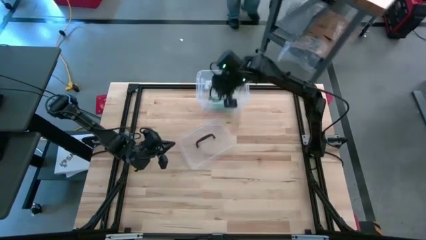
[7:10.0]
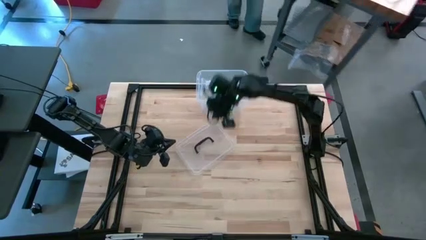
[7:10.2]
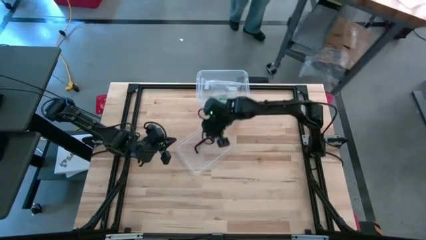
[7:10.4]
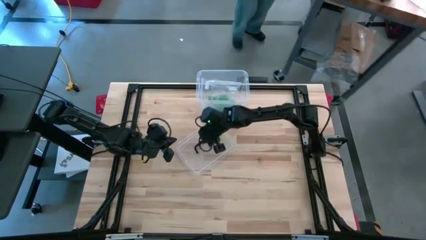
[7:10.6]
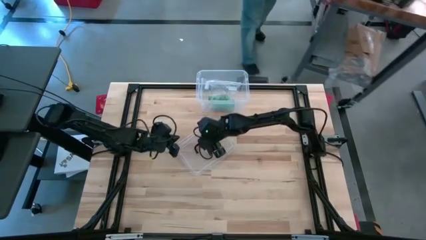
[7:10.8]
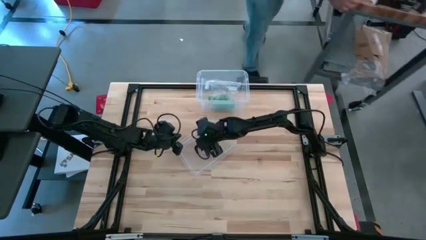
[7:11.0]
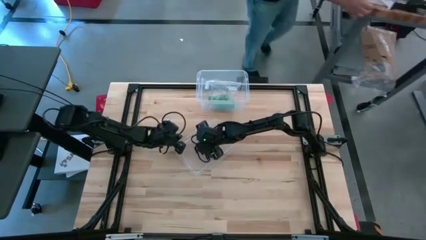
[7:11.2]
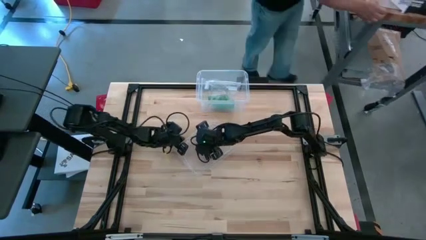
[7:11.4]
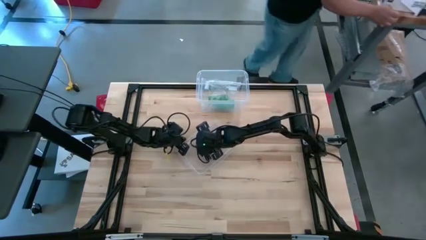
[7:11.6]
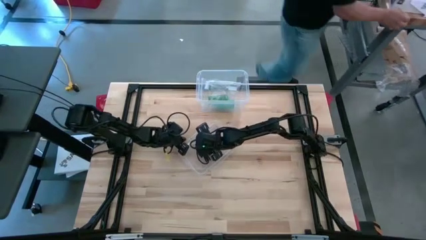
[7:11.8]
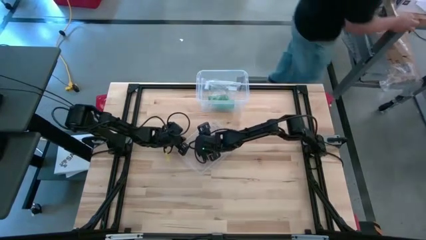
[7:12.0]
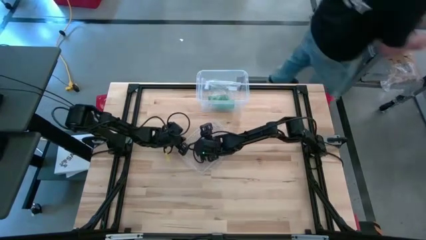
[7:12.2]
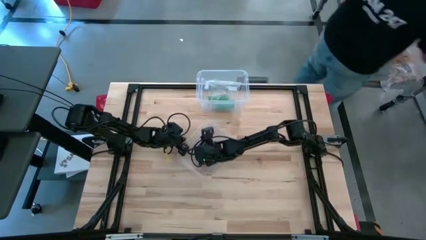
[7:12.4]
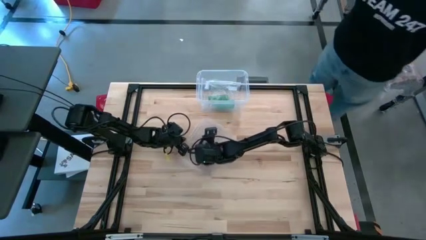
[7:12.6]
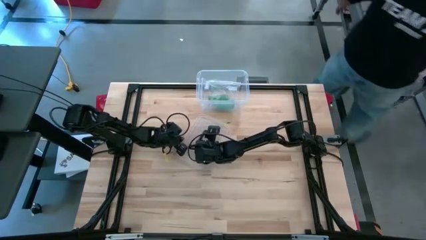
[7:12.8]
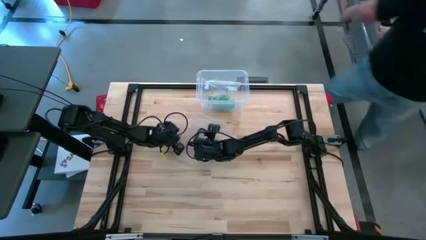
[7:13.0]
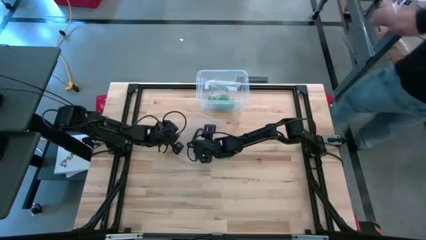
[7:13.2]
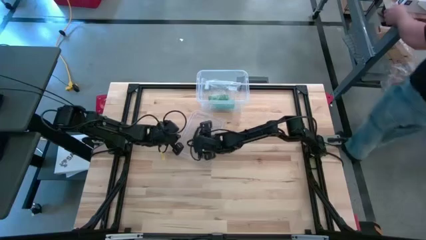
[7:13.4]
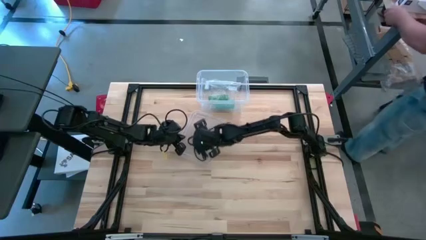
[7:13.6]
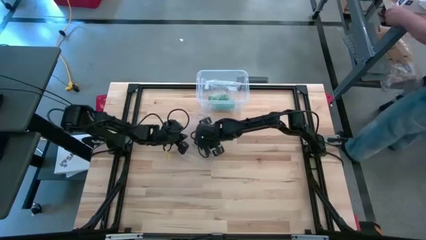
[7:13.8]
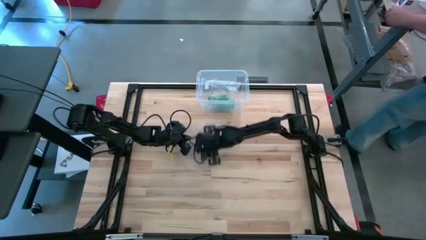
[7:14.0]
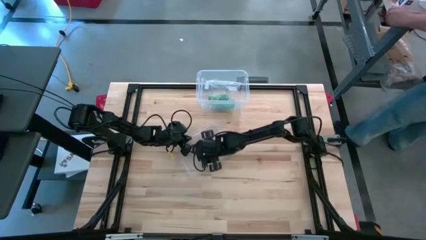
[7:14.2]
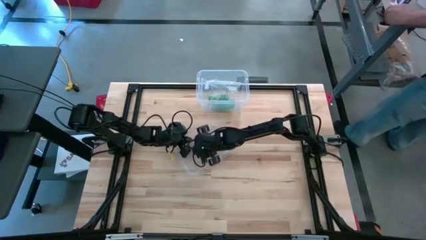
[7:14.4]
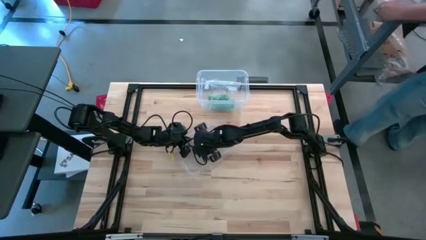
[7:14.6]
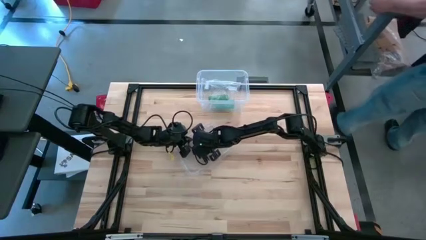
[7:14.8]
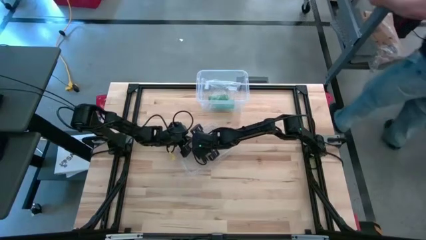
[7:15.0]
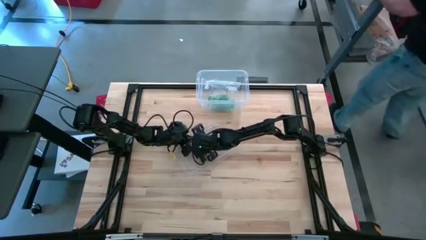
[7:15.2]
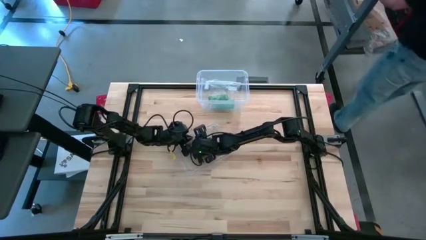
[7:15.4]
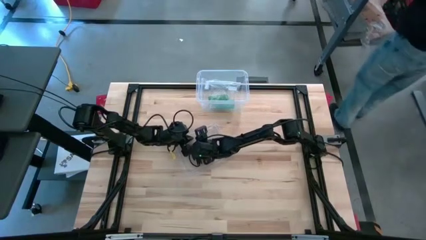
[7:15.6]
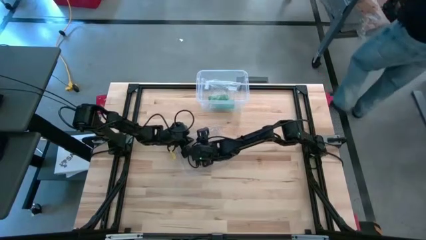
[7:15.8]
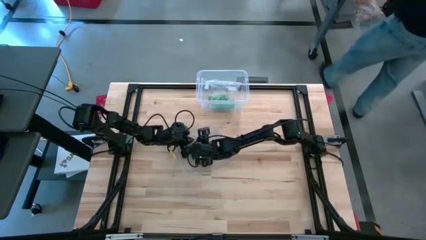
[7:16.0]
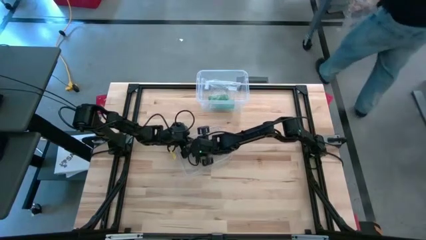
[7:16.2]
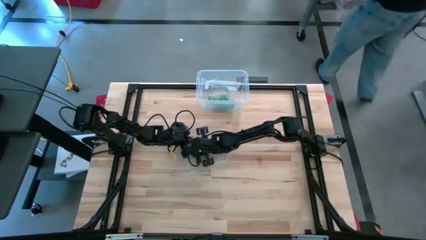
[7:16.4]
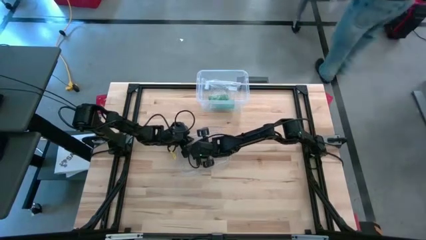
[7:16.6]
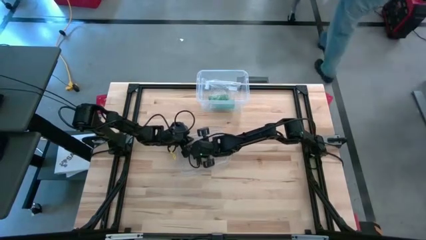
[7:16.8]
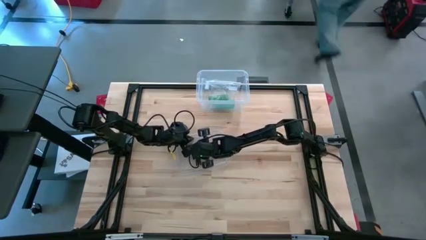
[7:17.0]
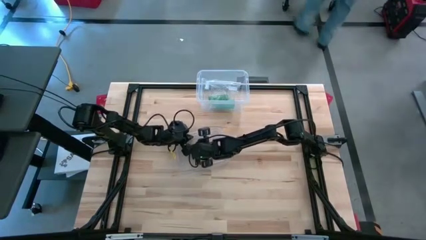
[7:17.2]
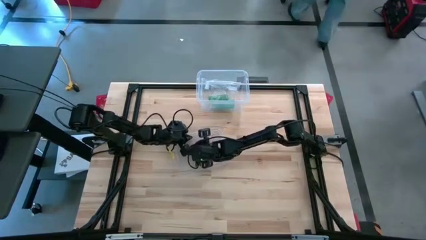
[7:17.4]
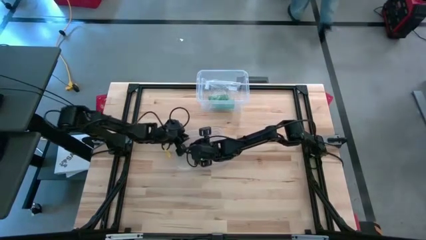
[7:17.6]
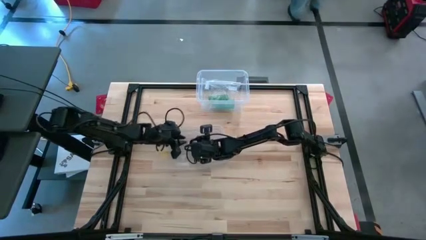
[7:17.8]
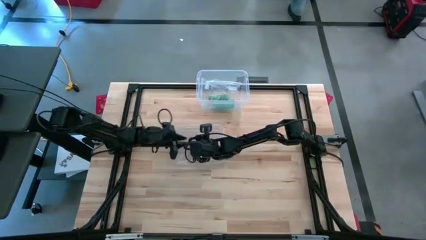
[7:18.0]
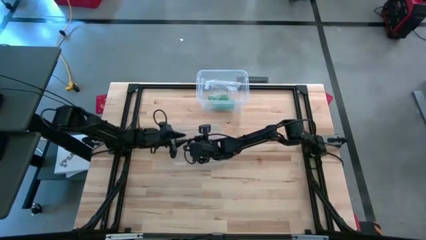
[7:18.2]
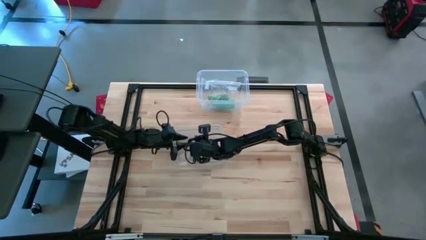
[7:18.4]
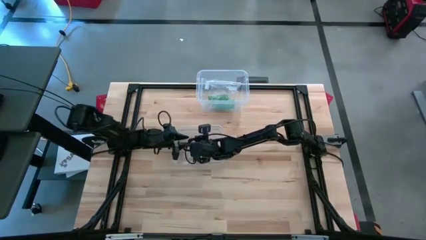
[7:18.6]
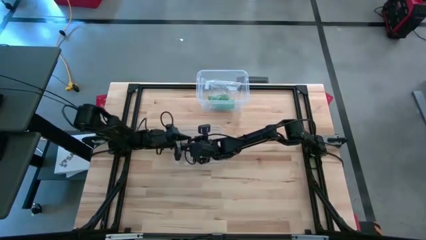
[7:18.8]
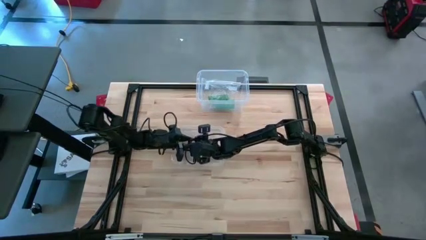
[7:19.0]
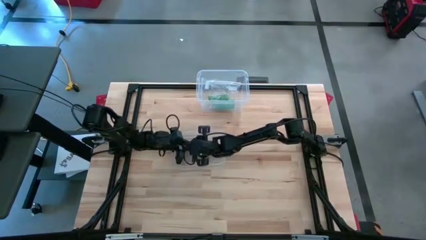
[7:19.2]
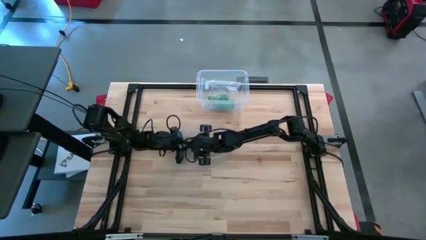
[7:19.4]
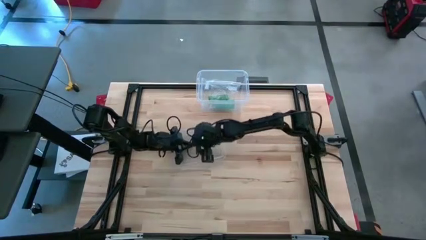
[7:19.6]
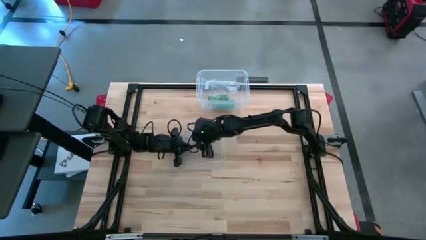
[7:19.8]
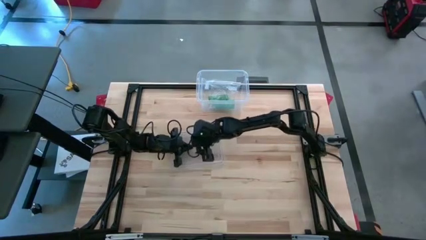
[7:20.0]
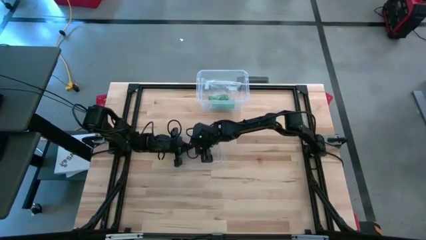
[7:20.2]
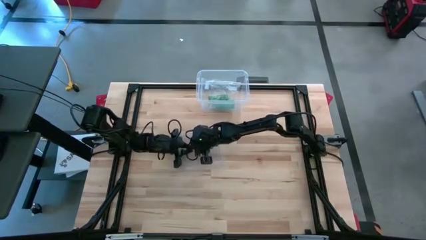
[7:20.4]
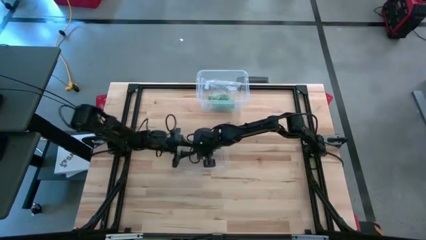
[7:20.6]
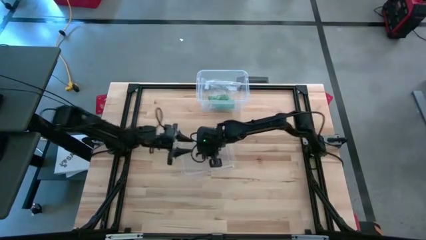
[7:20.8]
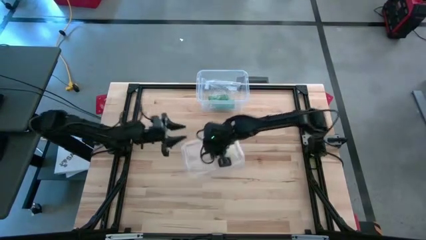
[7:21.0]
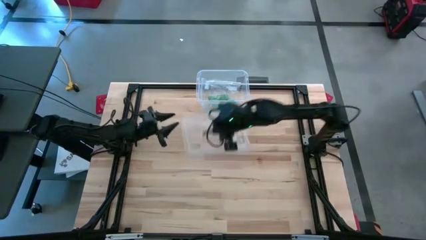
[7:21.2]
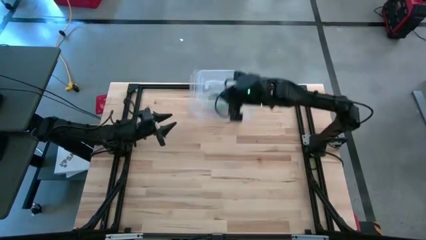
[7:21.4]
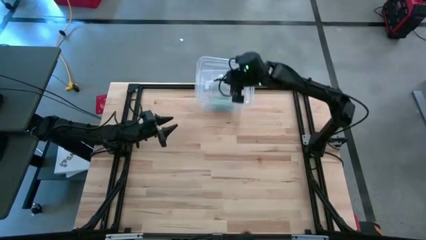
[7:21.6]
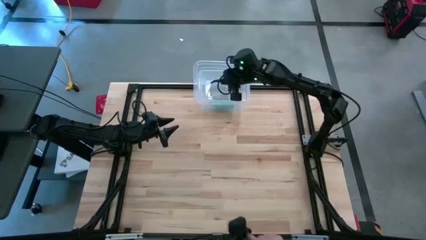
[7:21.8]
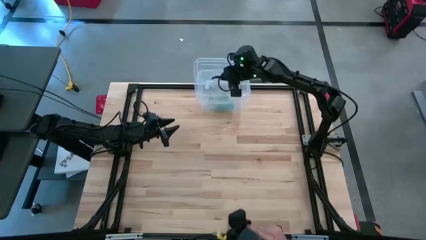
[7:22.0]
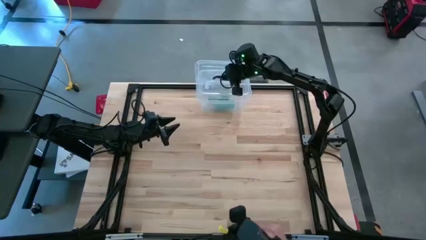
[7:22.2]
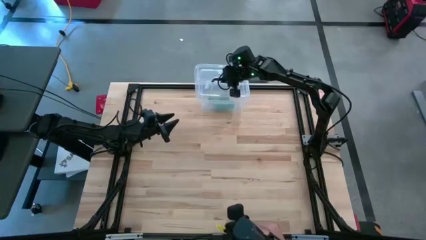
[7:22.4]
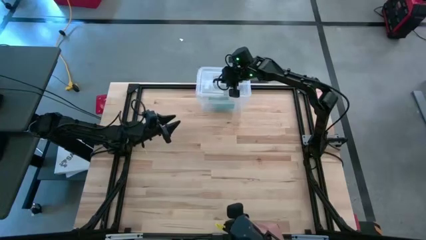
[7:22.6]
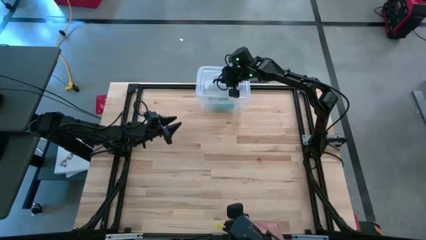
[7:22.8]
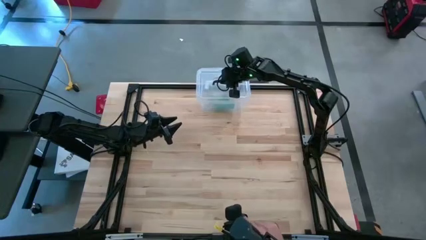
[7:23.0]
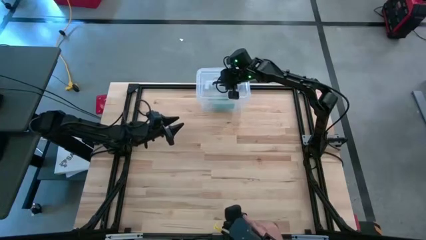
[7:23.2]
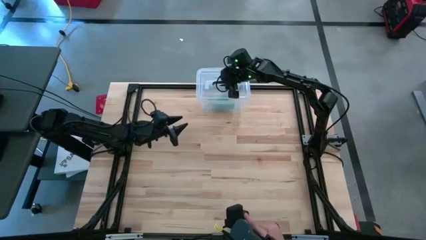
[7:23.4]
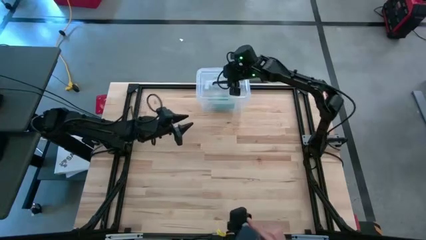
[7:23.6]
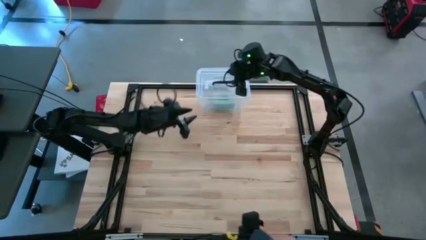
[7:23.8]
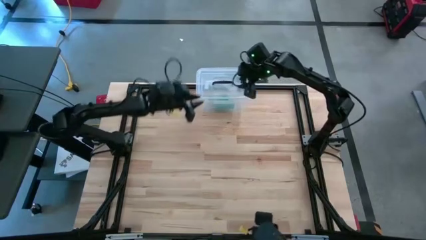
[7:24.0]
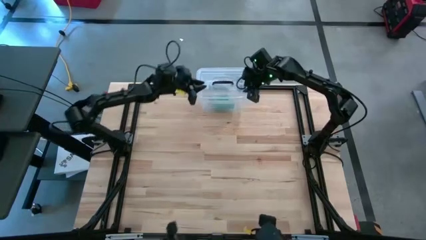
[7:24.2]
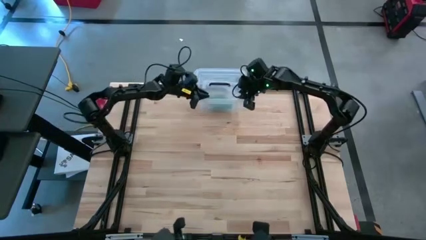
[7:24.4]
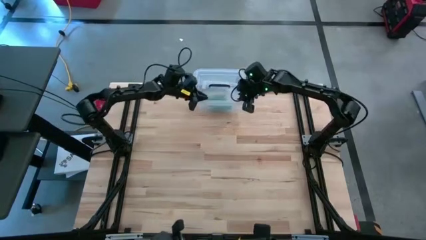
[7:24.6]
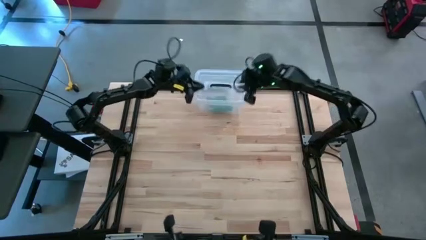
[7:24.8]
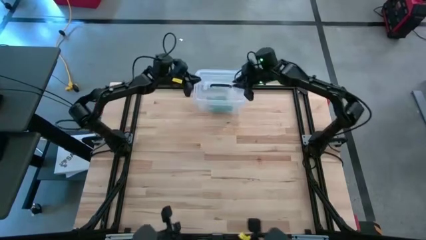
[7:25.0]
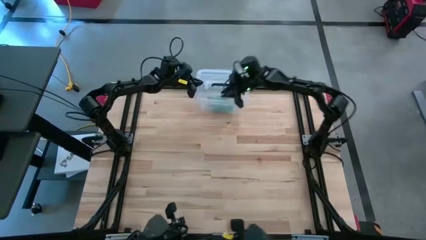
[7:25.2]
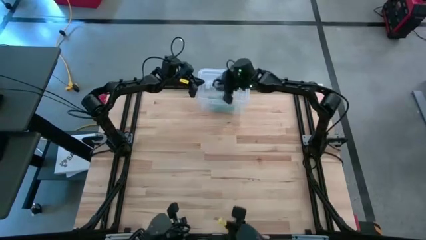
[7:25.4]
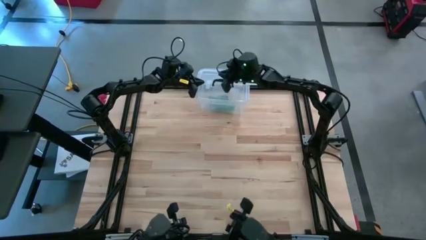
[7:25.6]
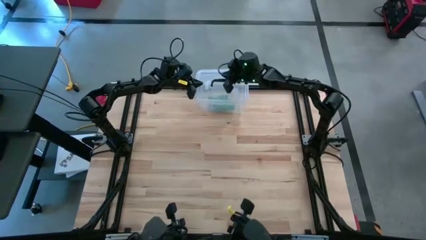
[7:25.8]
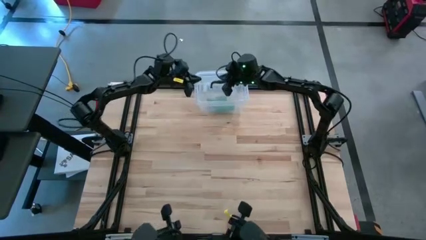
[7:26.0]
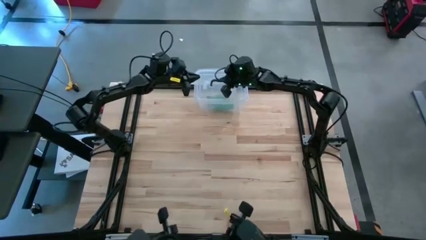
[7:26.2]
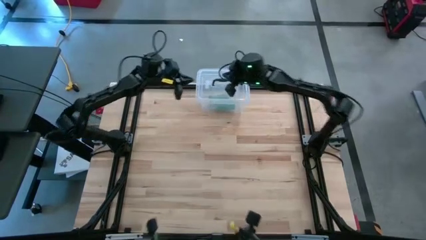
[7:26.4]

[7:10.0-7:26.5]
Task: Roll bandage
Close the transparent bin
